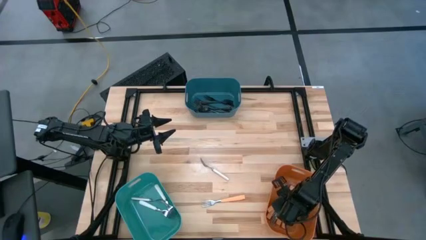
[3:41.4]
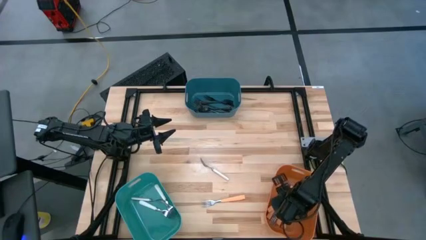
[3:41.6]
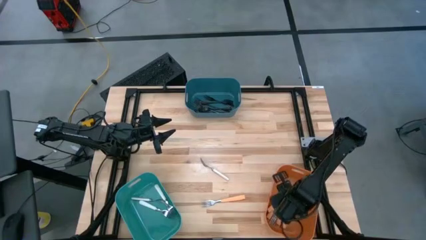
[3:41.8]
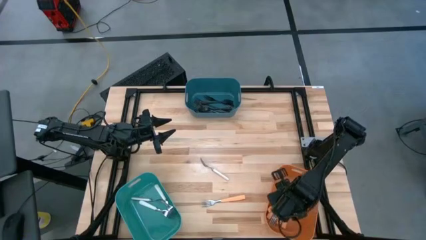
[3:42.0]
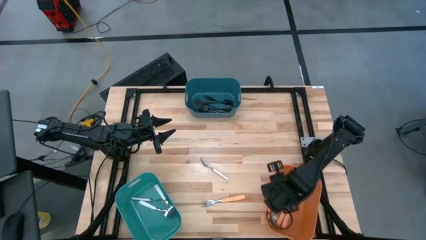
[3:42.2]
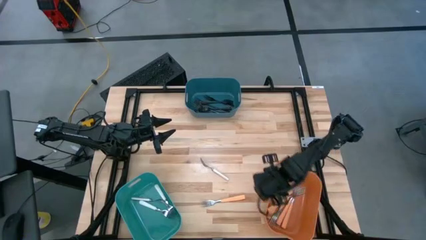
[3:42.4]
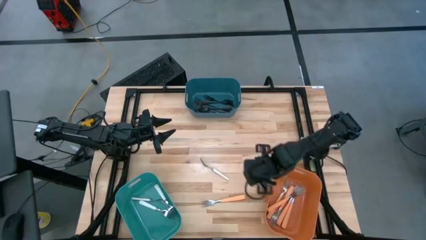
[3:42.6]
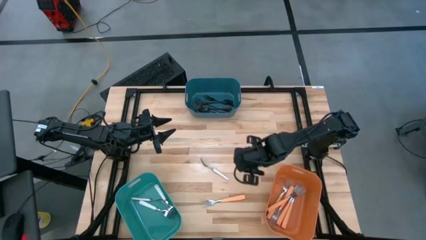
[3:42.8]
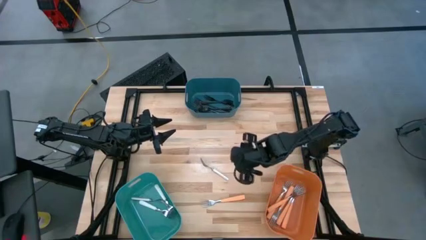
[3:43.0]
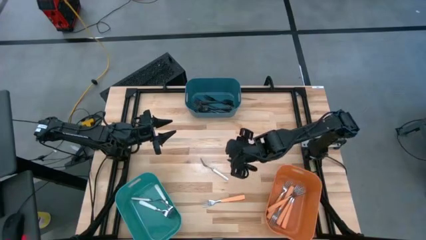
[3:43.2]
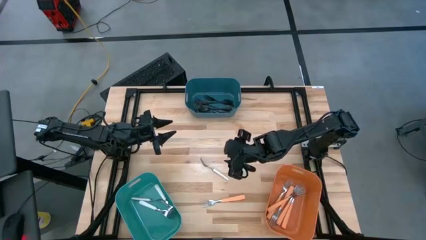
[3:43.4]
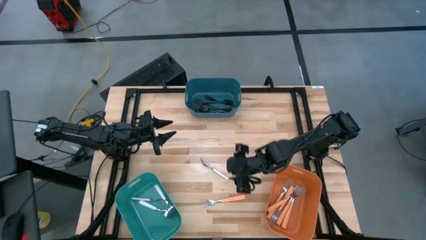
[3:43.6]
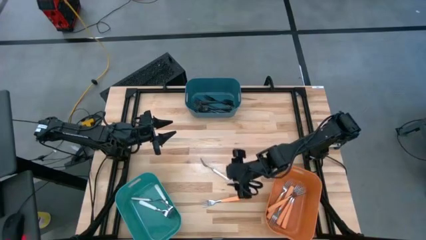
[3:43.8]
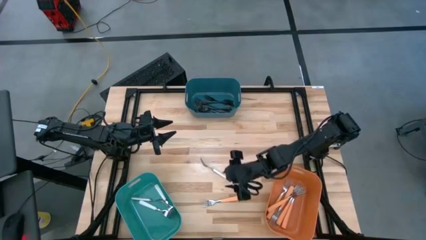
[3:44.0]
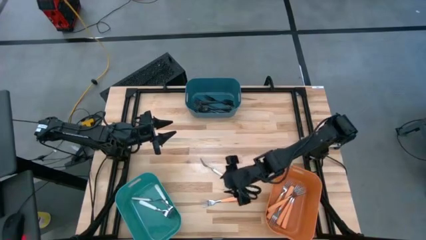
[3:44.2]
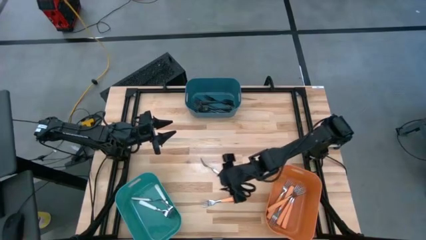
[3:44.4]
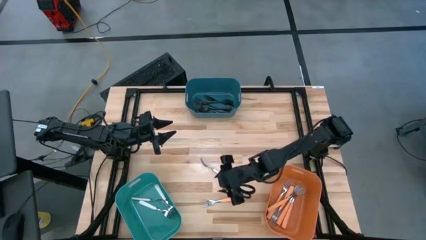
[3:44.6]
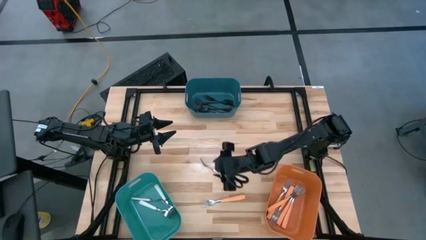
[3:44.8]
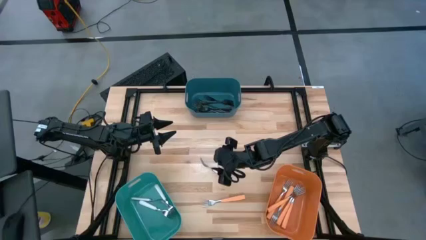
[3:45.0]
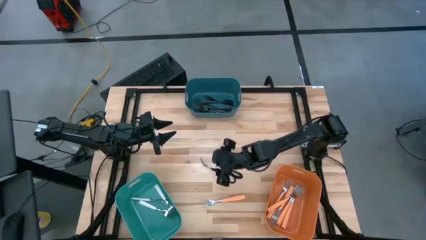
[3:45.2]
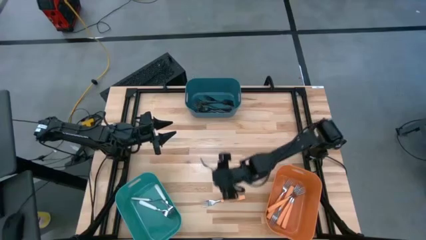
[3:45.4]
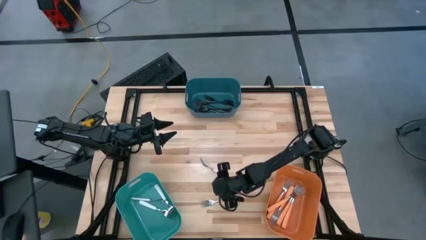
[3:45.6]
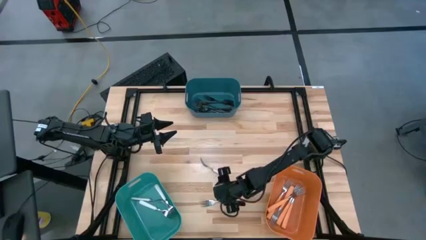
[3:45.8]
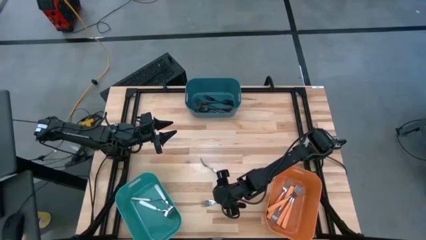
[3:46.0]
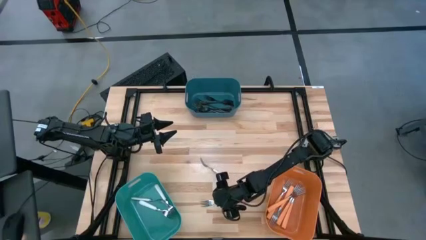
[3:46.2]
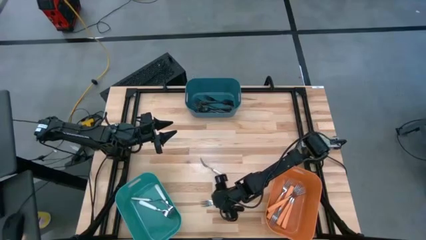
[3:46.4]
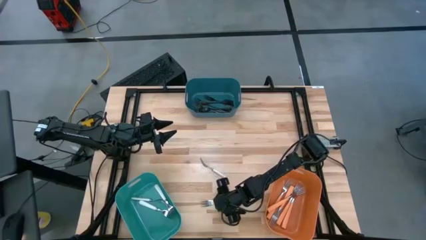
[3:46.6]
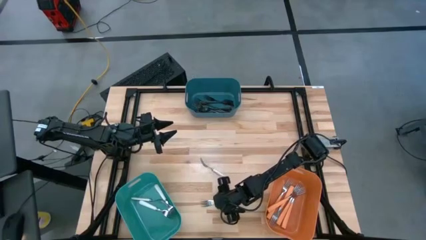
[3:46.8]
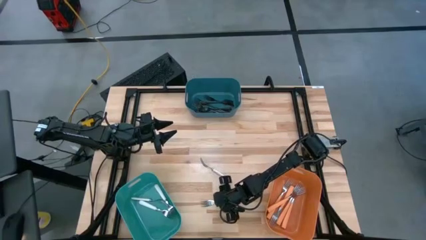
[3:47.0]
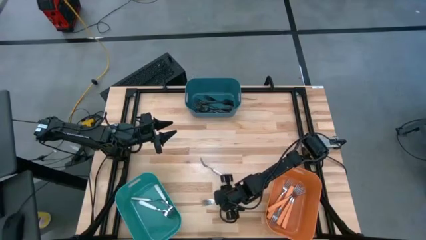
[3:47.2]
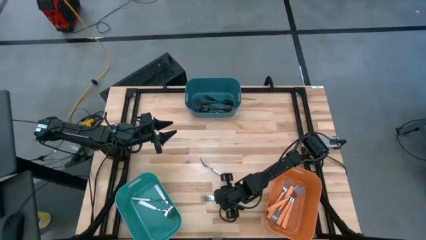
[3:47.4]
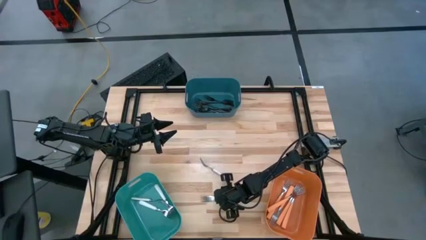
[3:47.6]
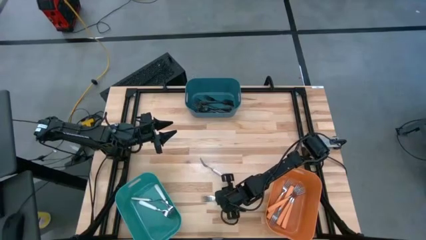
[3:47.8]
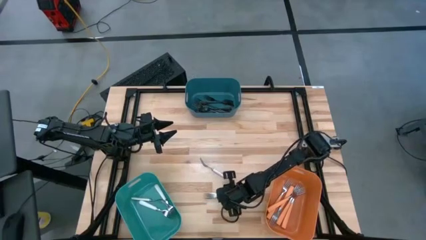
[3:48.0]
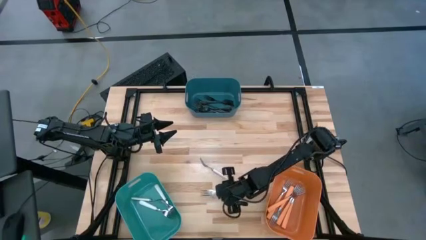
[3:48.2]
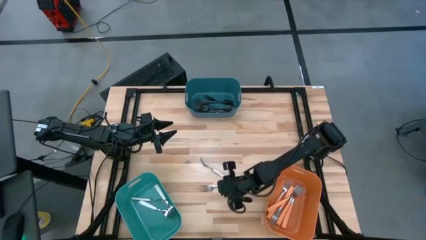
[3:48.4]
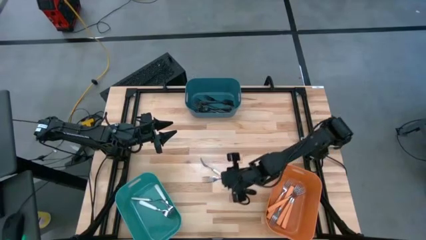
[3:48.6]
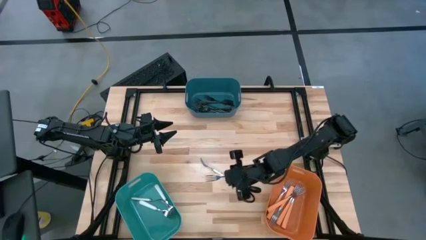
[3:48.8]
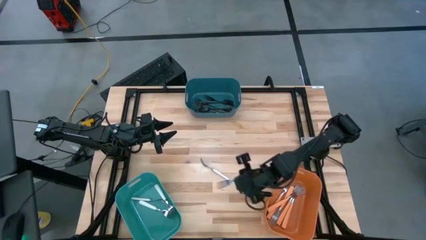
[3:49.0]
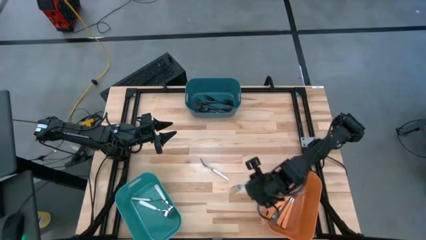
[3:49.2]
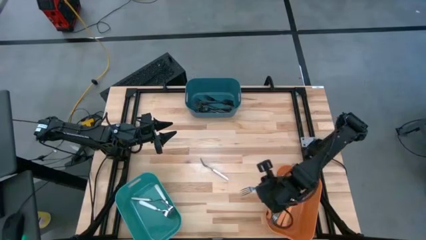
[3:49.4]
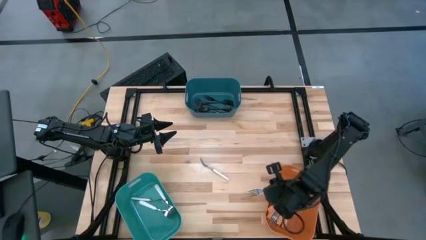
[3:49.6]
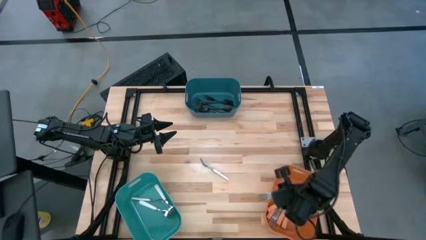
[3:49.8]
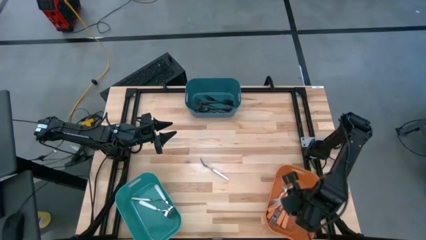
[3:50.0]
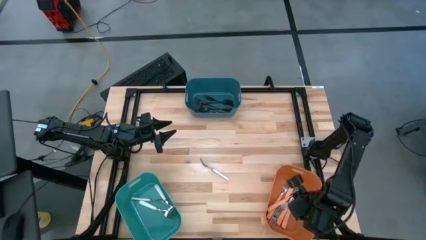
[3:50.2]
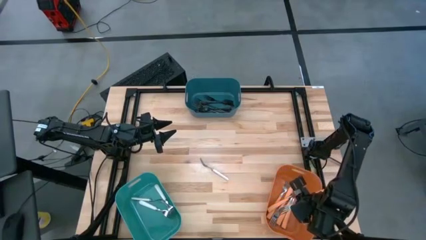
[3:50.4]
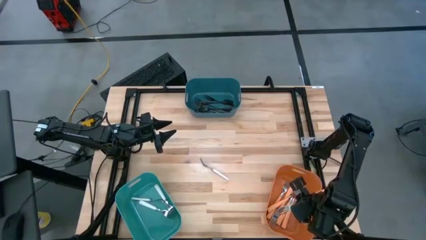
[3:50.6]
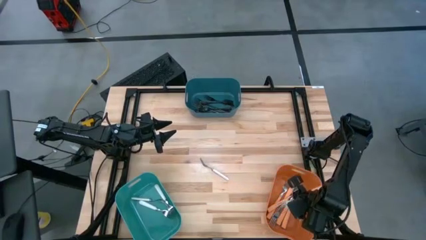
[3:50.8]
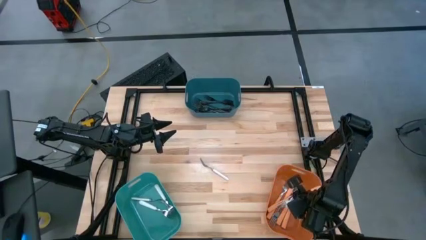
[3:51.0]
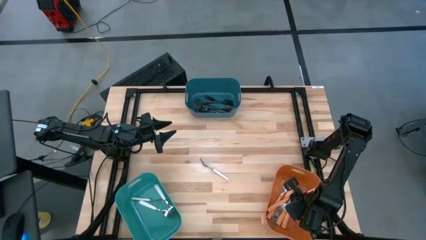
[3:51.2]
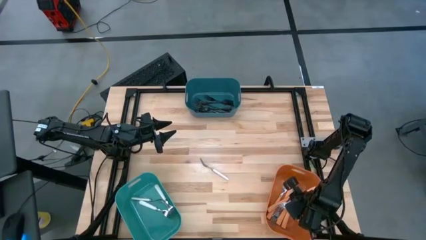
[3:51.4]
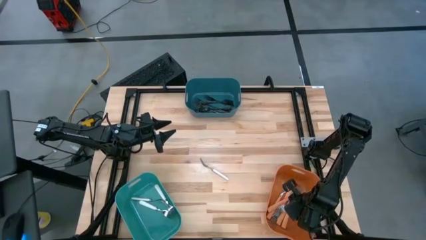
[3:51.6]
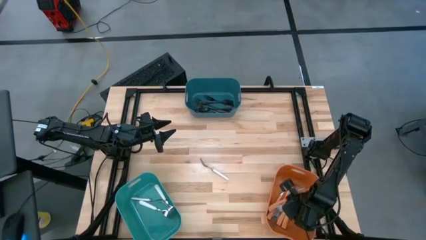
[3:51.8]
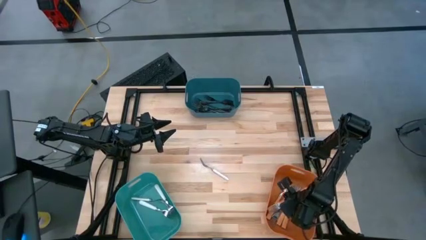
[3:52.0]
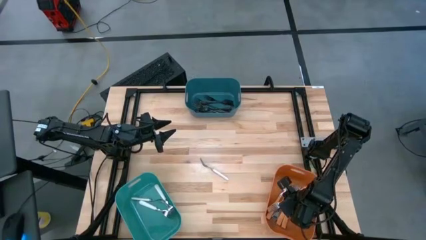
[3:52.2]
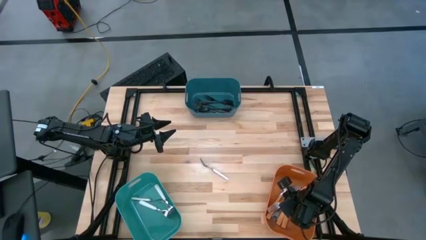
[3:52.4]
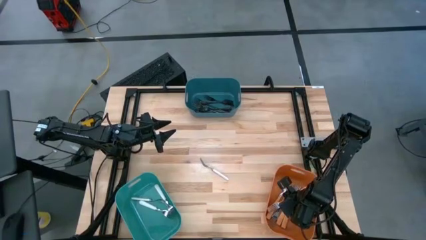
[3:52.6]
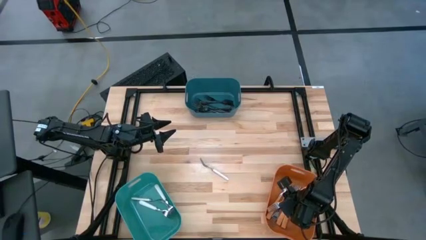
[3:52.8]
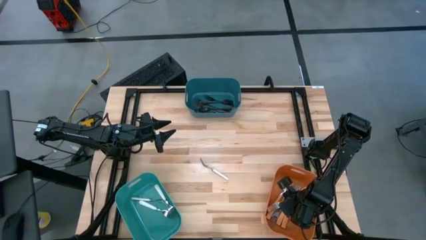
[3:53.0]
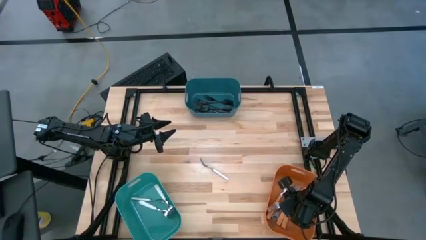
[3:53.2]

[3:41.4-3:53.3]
Task: Sort silverware by color (type)
Put the orange fork into the orange bin

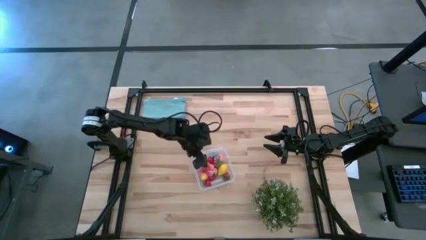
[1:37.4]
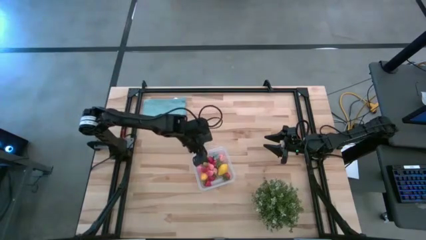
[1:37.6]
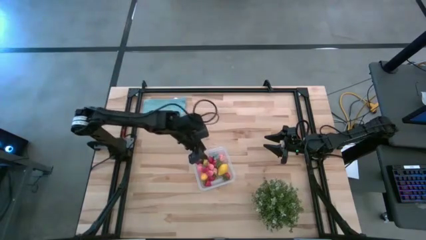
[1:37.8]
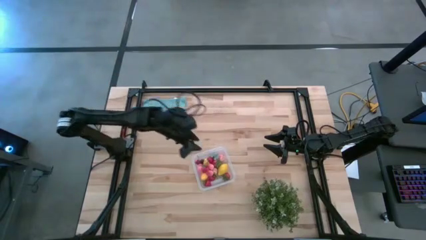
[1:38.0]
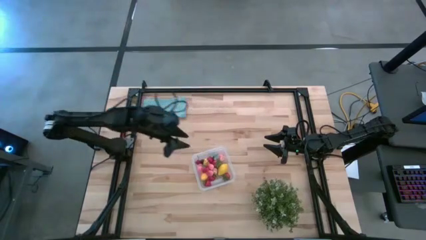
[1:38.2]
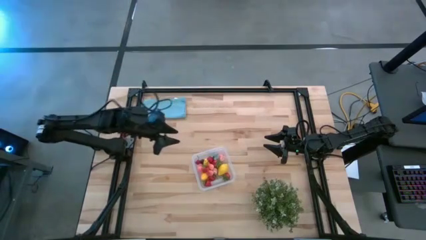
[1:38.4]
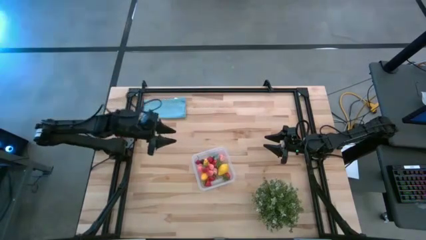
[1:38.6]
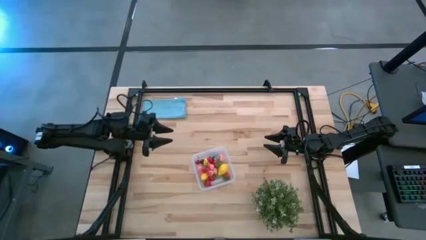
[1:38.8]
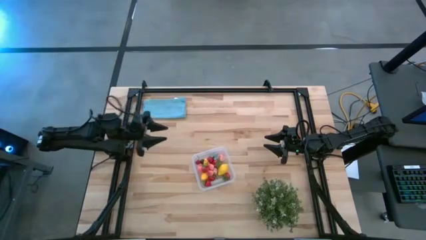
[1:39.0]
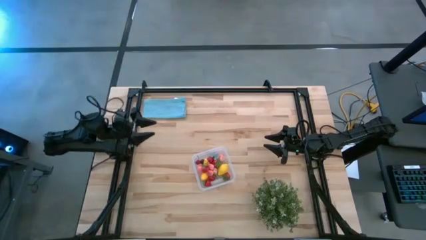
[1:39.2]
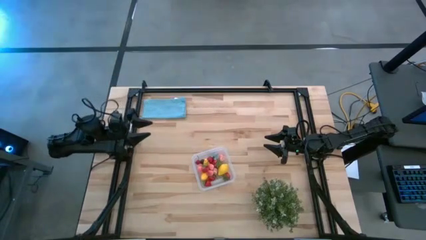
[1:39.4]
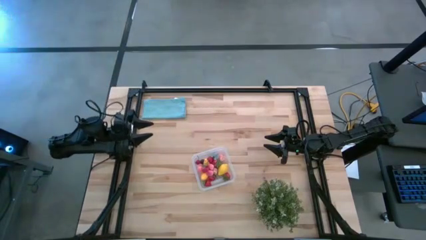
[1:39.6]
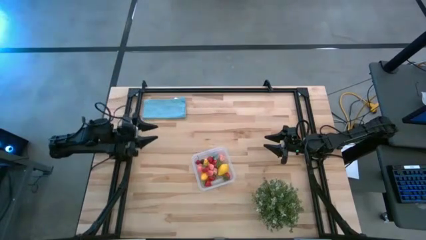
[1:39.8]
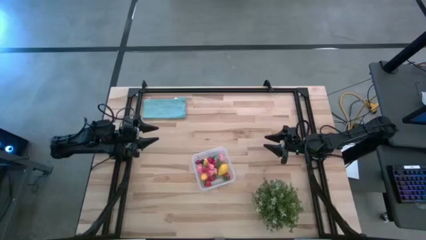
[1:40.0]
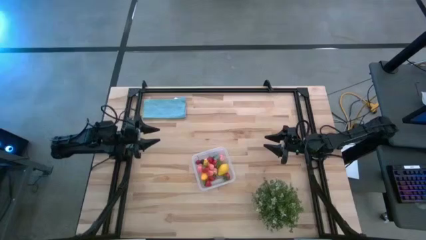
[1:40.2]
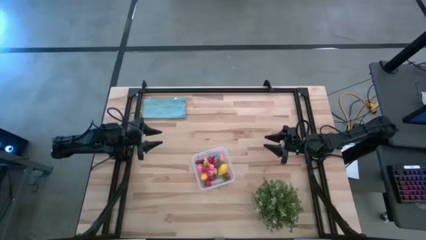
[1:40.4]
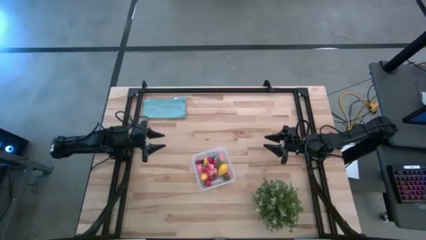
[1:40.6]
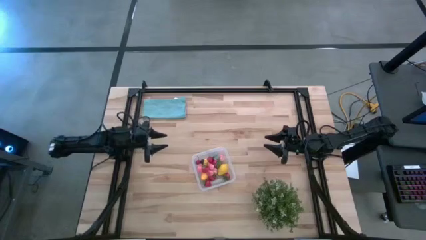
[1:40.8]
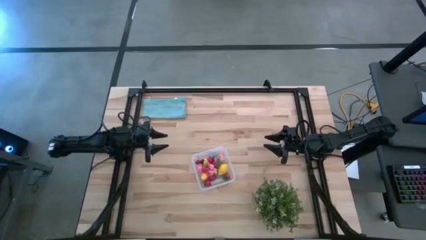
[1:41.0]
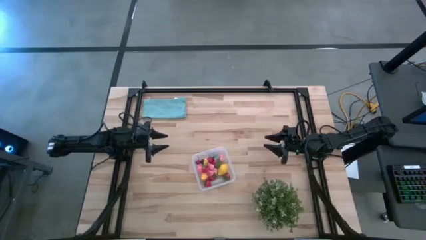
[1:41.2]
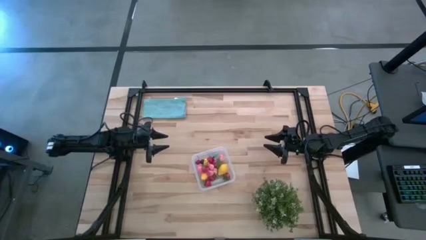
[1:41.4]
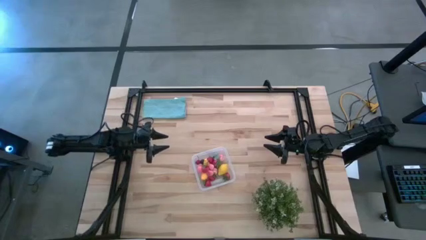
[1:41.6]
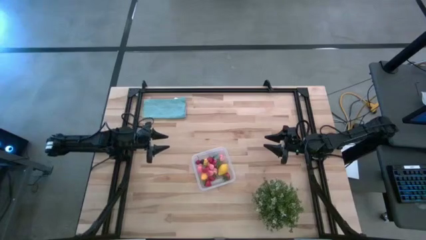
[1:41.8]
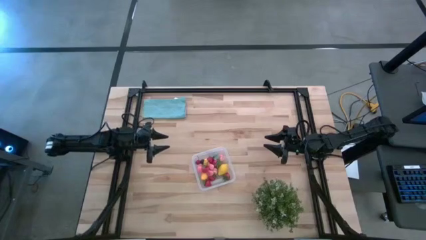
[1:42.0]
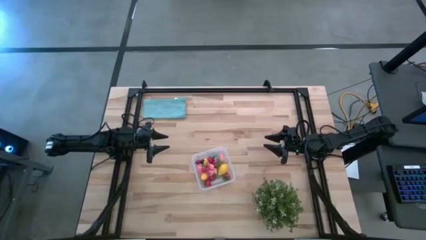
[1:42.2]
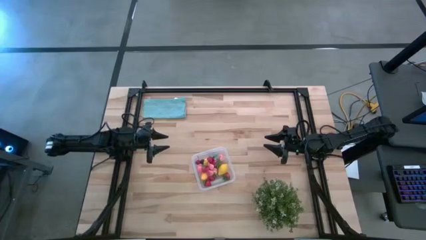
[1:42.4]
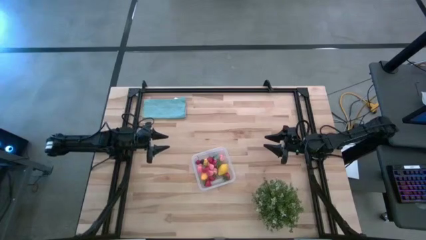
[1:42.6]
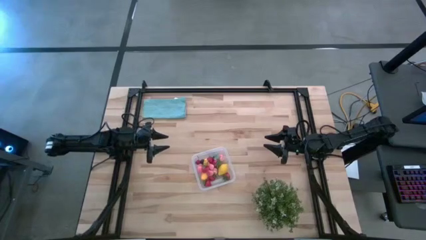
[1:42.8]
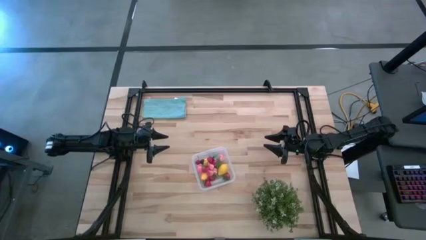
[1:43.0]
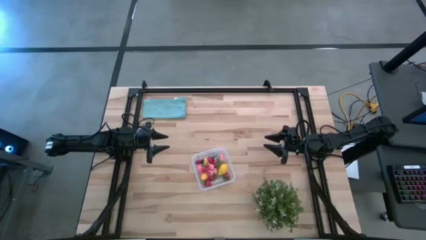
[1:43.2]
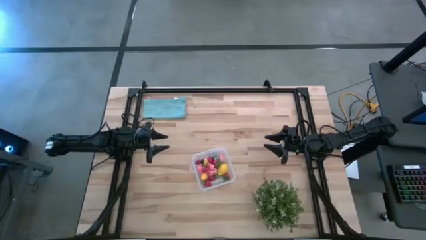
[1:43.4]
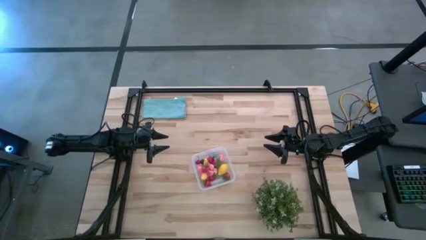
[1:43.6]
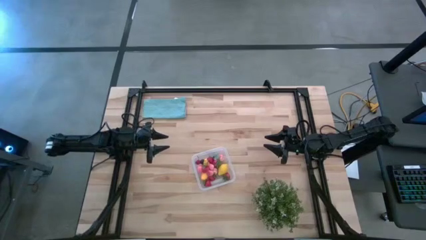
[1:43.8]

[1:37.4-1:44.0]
Task: Pick and placing Produce into tupperware
Return to Home Position
